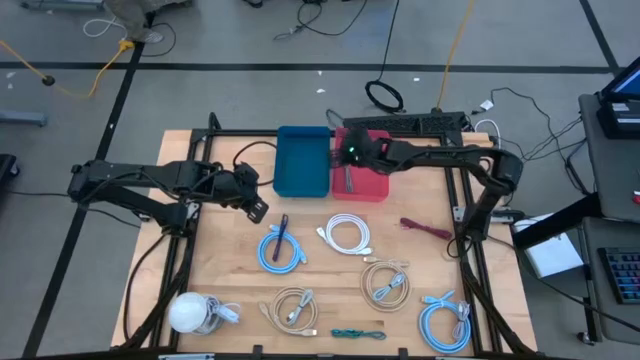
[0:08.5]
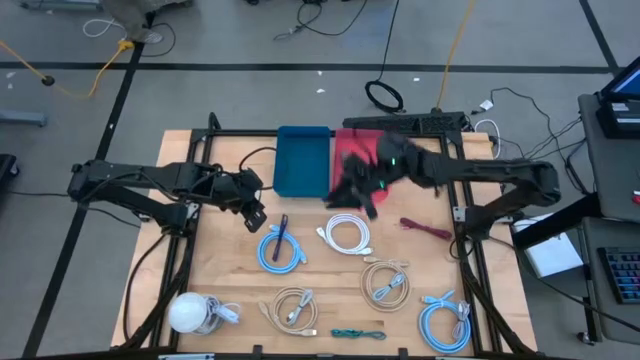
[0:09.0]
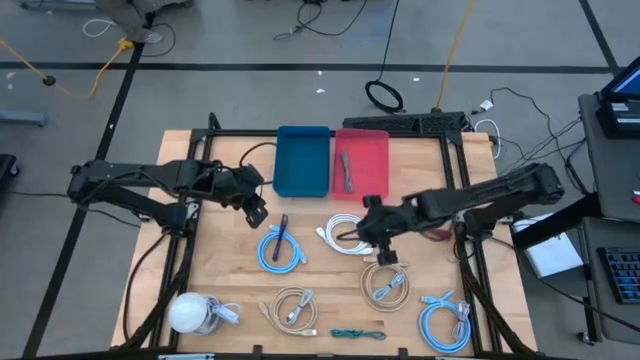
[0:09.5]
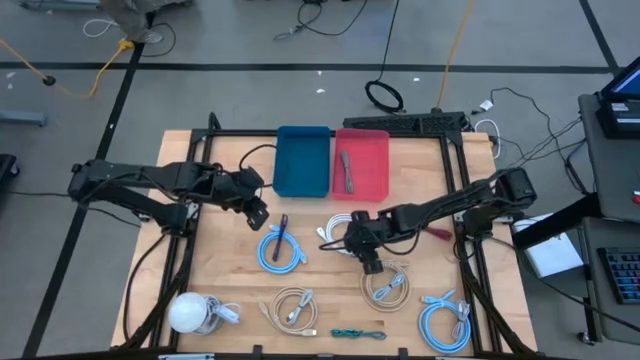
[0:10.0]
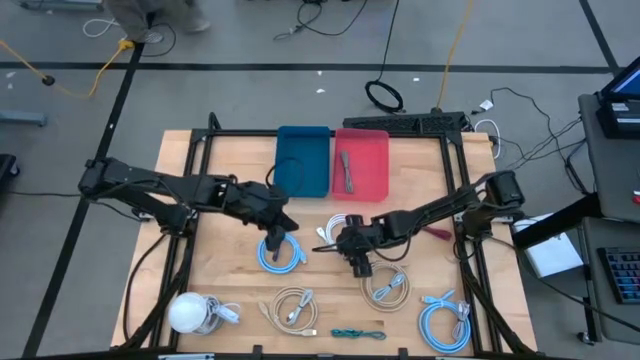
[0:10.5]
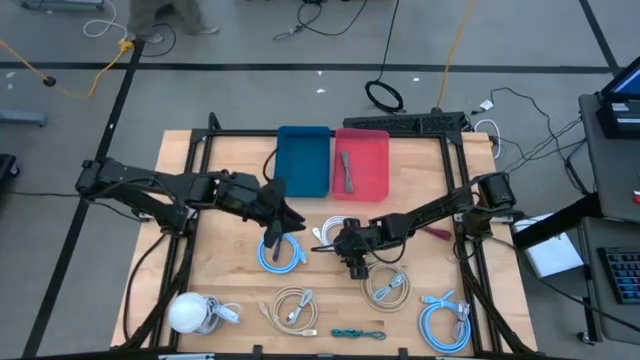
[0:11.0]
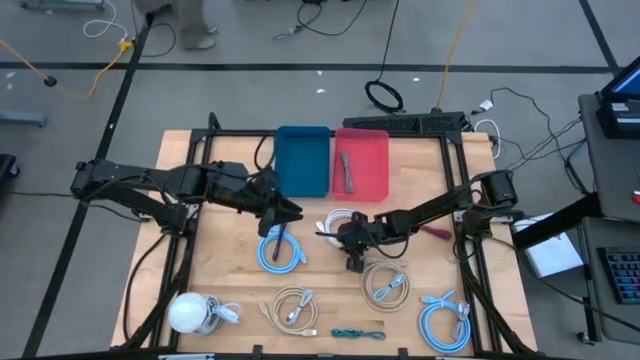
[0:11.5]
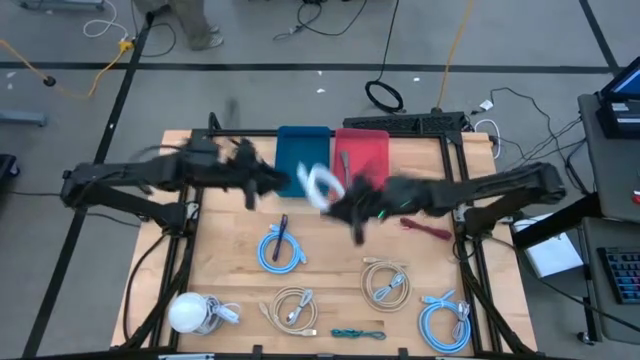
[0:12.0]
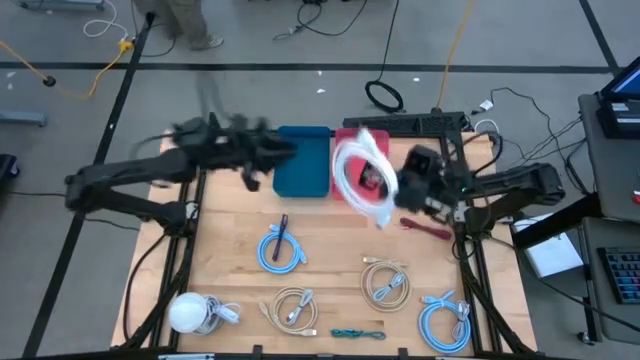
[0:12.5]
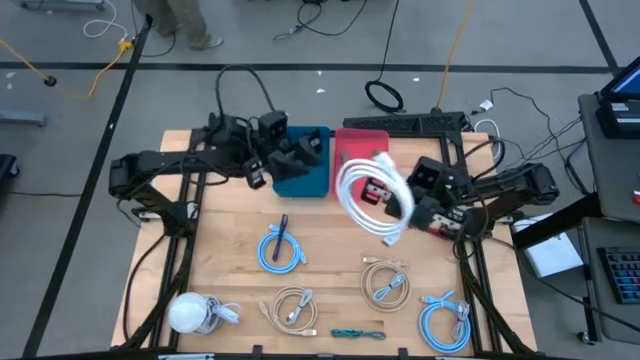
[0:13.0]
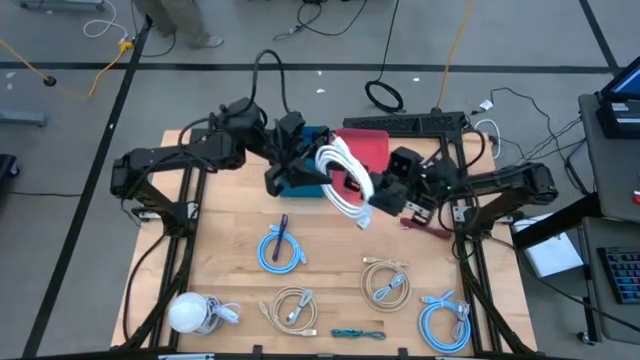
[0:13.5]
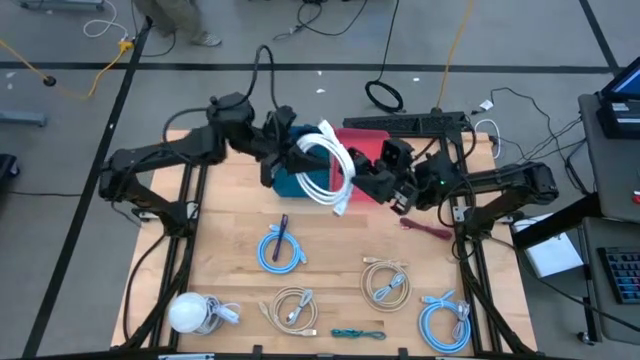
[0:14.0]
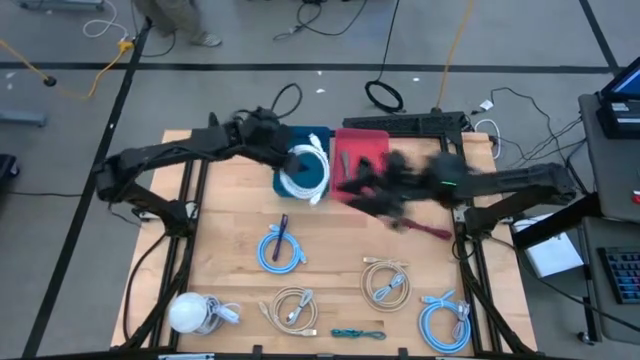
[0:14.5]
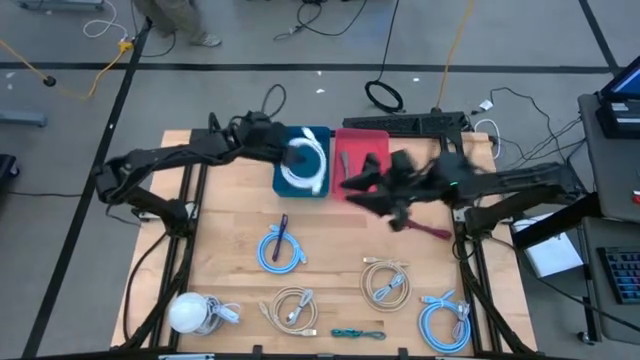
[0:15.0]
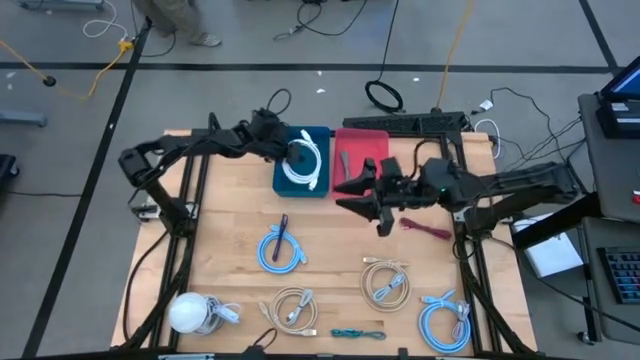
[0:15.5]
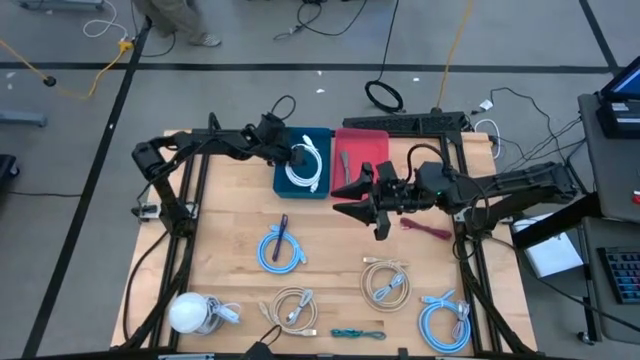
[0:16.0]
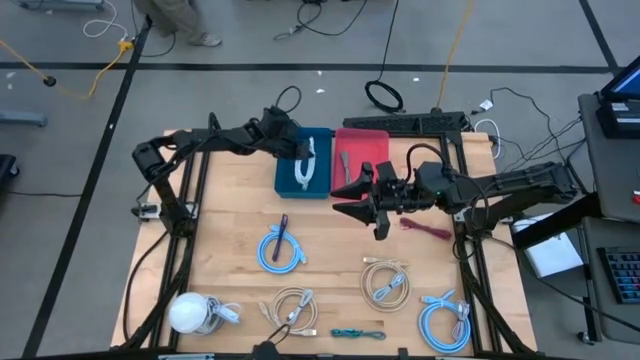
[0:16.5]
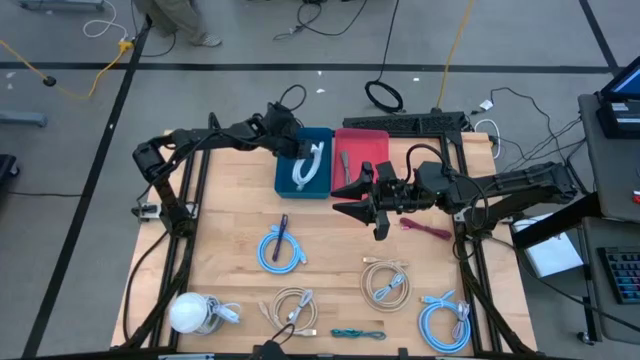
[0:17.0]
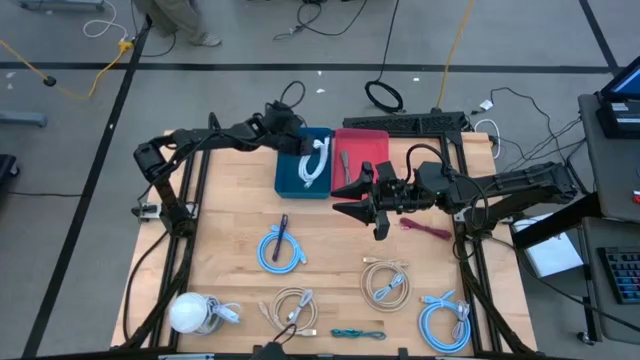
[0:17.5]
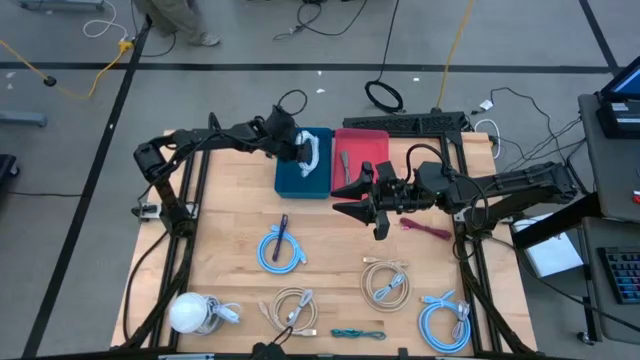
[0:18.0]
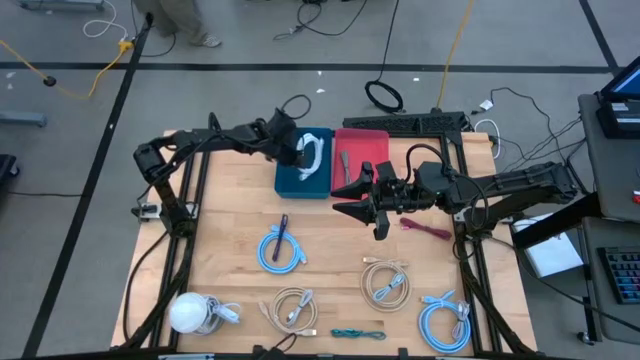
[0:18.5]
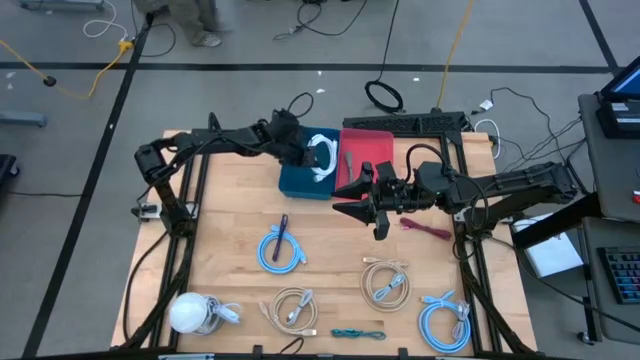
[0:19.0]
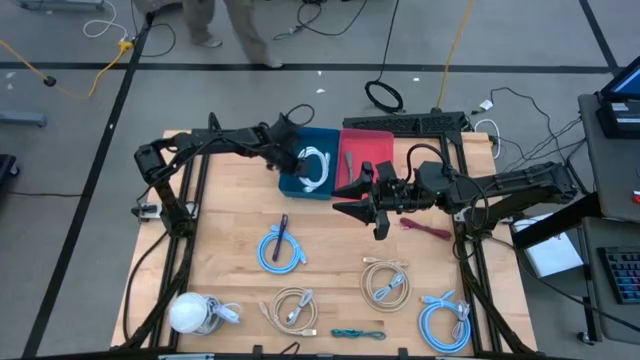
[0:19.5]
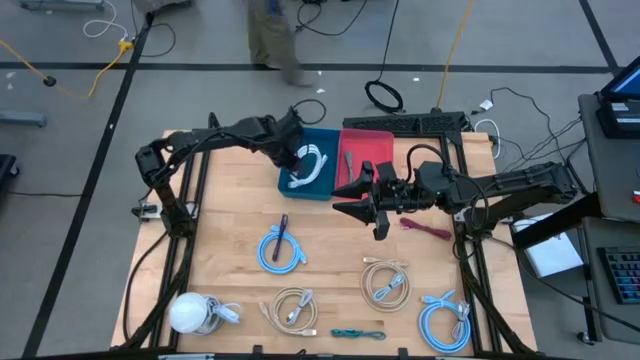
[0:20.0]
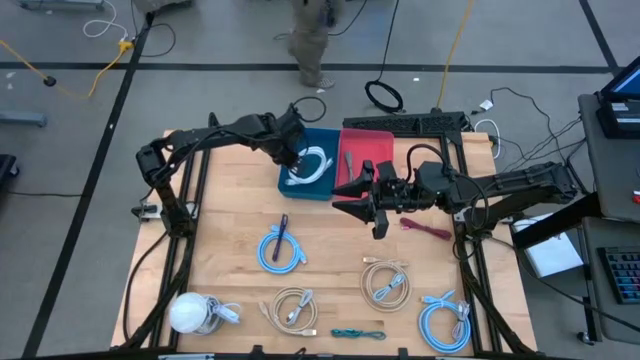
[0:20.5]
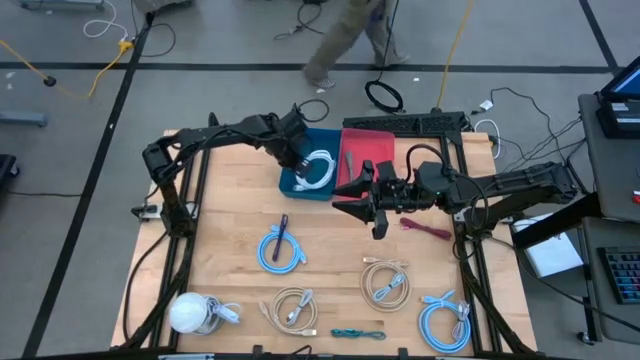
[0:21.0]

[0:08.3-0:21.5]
Task: Pick & Place USB Port
Put the large white charger cable into the blue bin

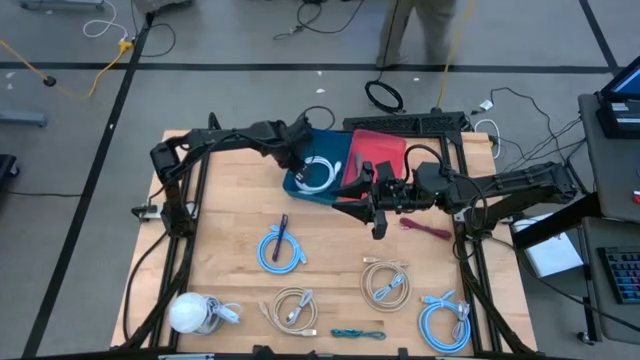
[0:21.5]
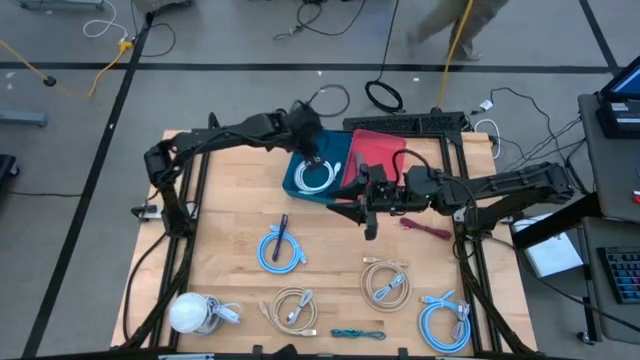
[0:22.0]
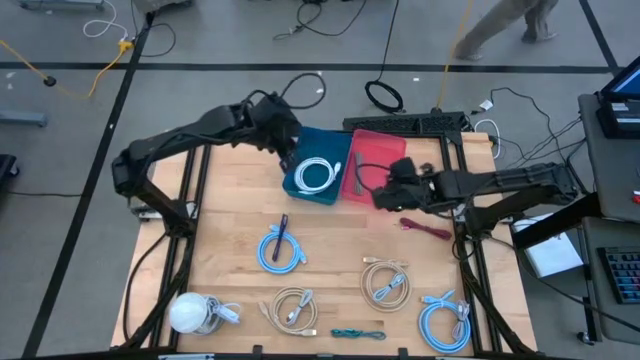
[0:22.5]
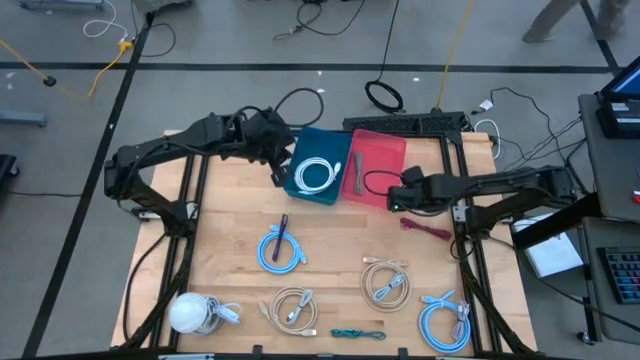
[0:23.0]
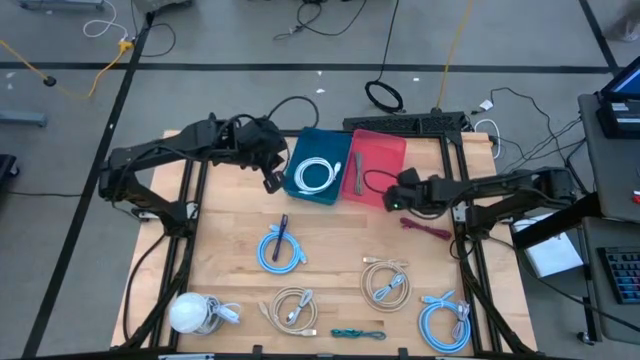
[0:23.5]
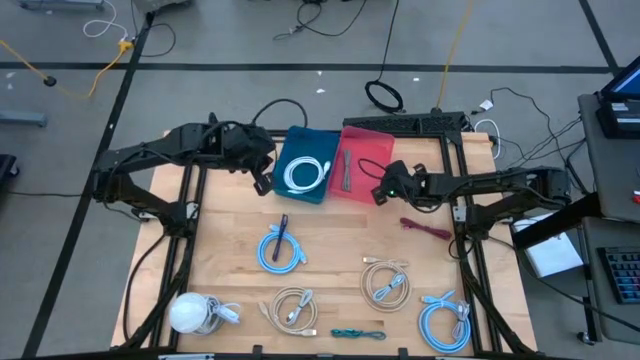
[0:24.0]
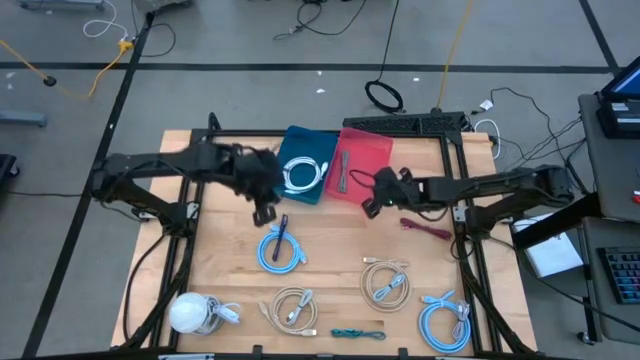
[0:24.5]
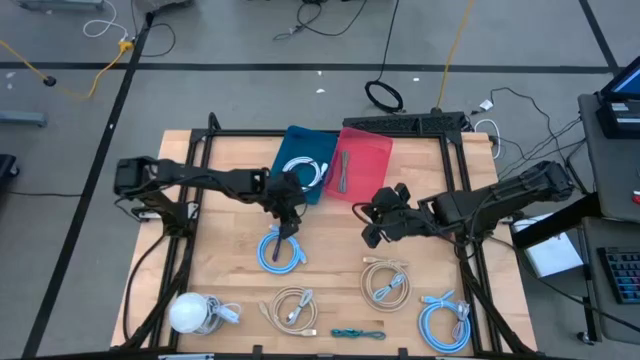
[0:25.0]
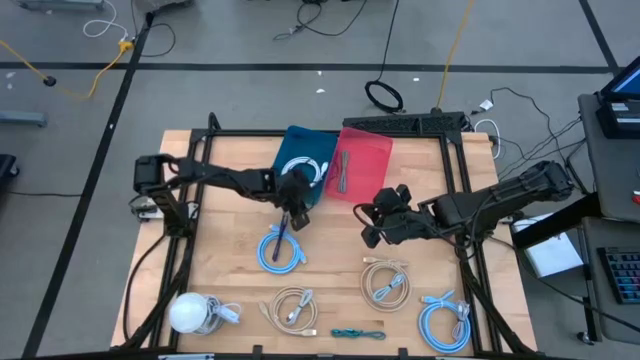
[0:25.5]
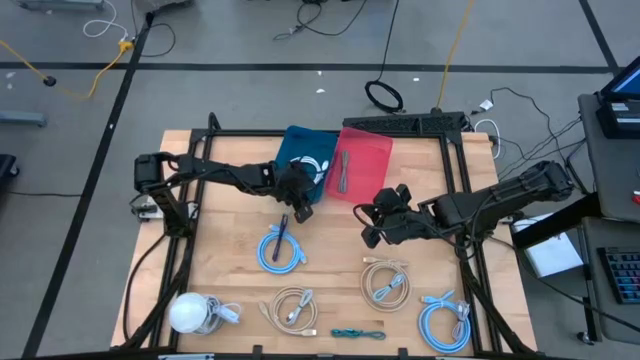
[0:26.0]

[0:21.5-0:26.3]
Adjust the blue bin

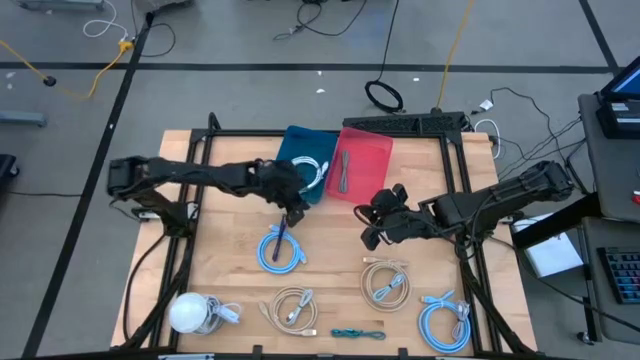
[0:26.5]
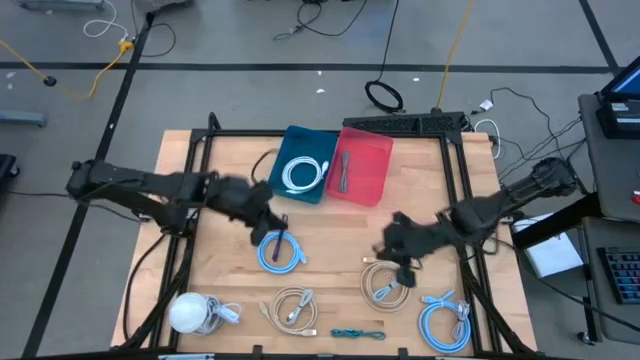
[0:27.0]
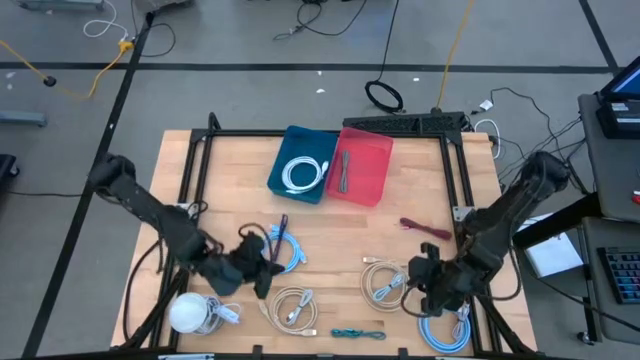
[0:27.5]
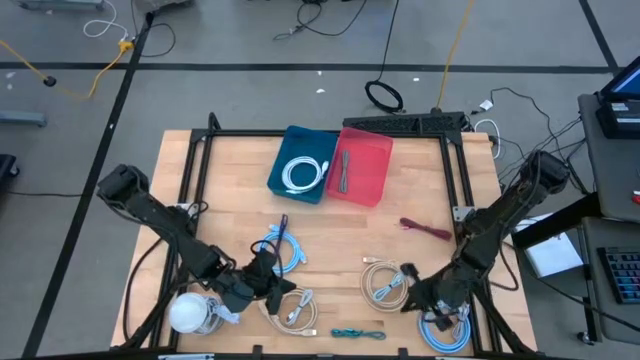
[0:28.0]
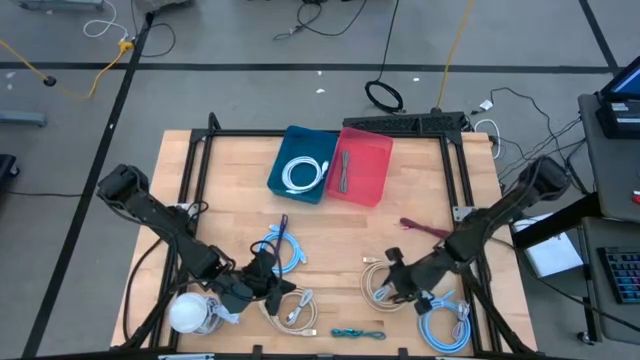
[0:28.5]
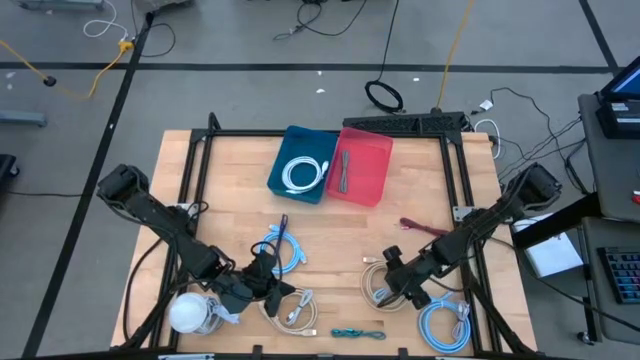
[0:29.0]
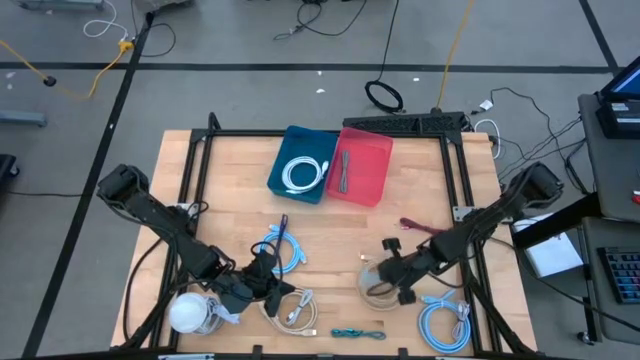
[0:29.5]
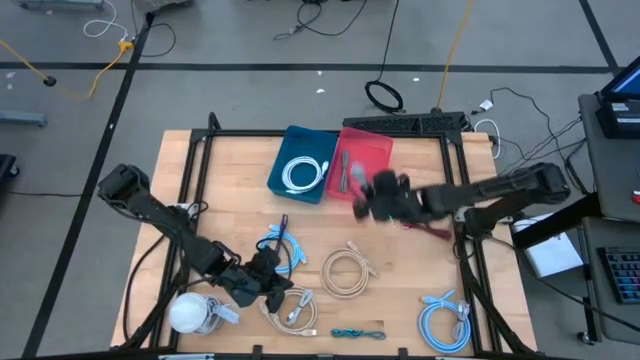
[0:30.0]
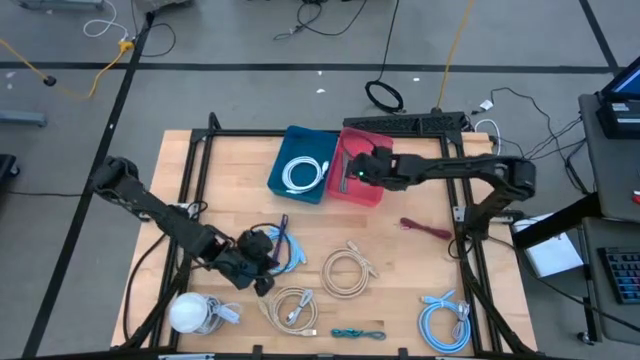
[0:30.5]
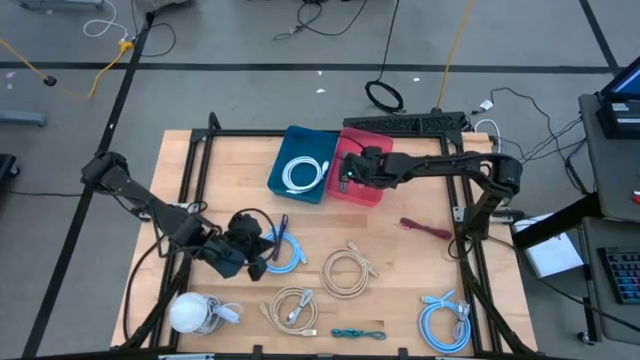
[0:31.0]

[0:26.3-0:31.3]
Put the small light blue charger cable into the pink bin
